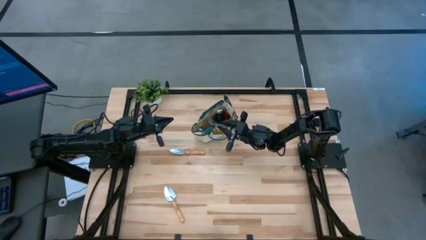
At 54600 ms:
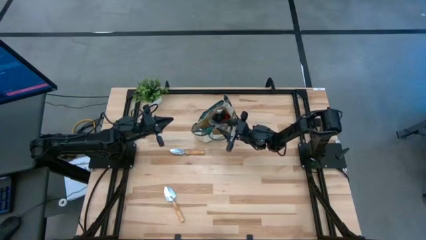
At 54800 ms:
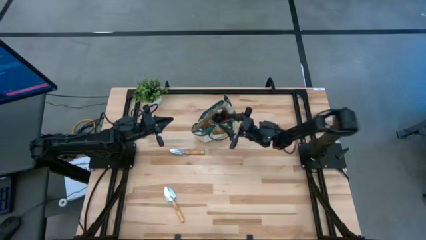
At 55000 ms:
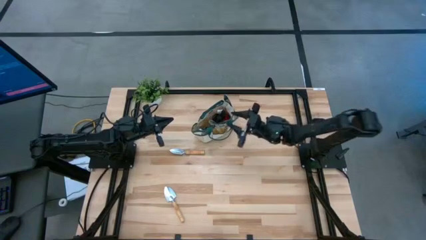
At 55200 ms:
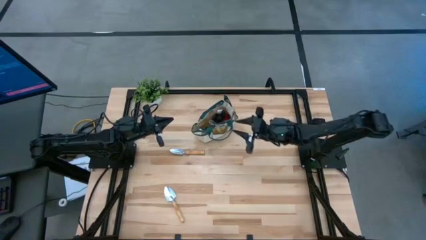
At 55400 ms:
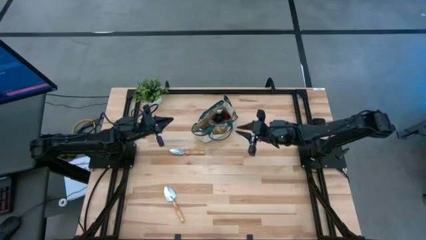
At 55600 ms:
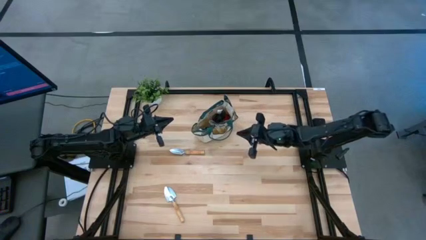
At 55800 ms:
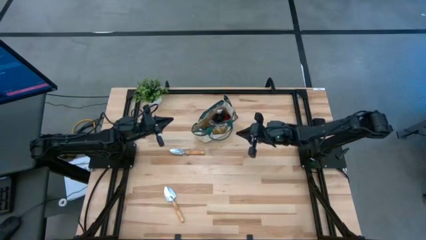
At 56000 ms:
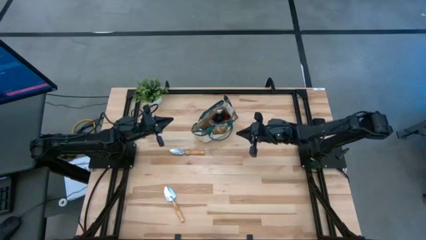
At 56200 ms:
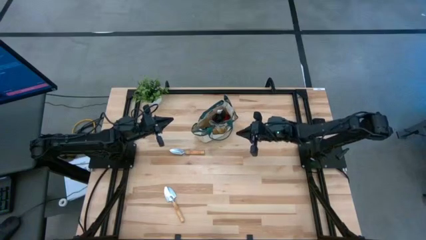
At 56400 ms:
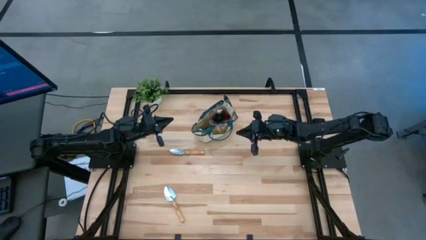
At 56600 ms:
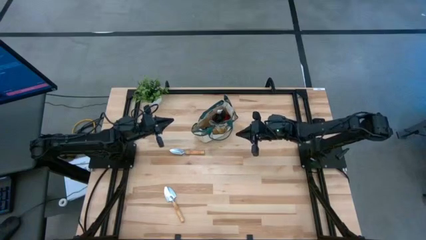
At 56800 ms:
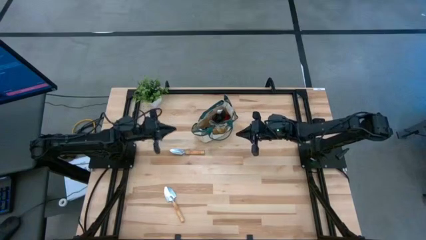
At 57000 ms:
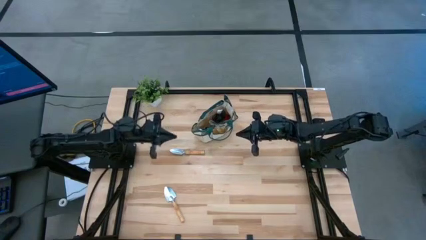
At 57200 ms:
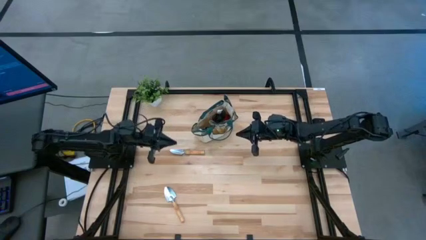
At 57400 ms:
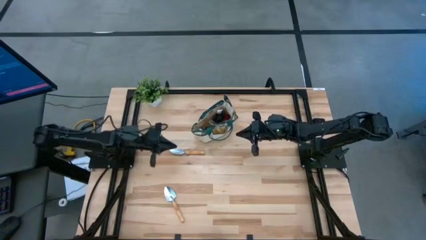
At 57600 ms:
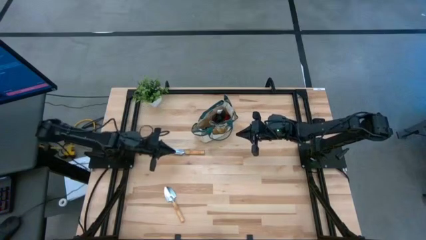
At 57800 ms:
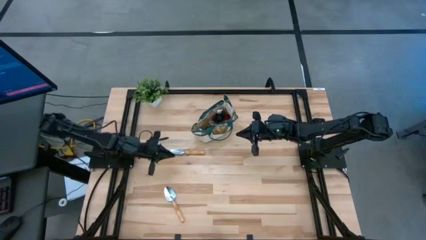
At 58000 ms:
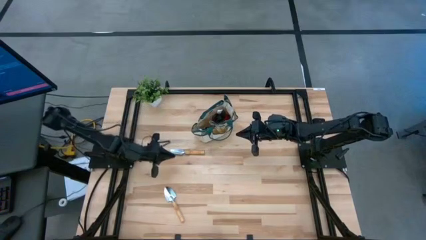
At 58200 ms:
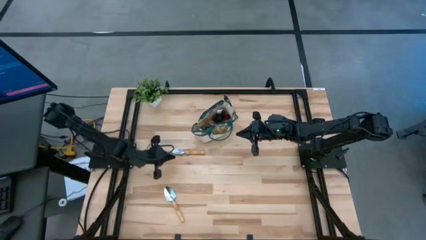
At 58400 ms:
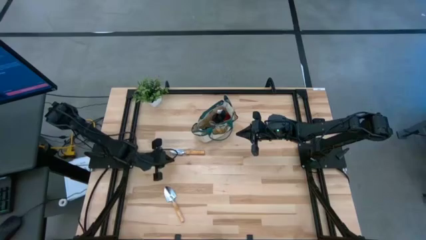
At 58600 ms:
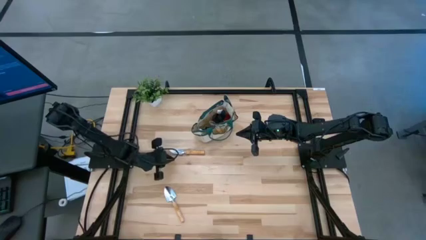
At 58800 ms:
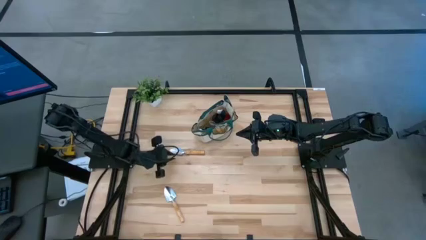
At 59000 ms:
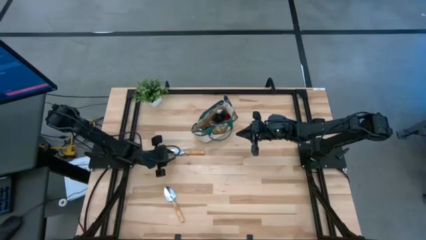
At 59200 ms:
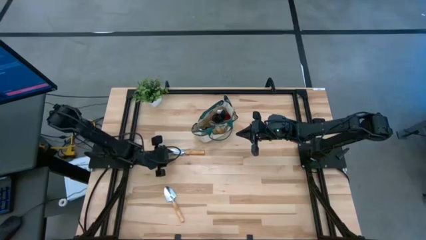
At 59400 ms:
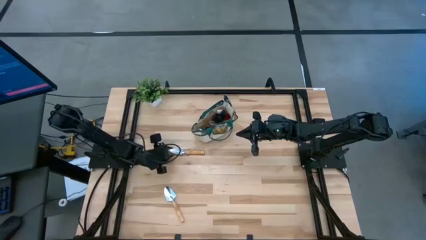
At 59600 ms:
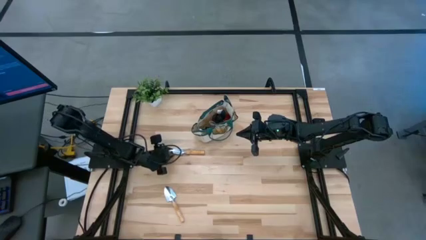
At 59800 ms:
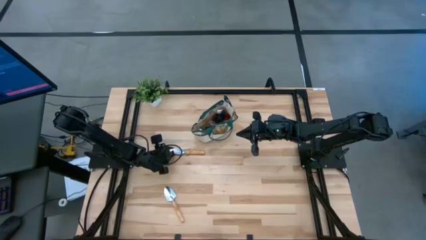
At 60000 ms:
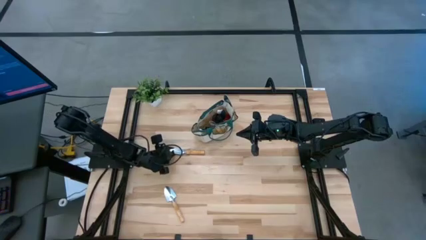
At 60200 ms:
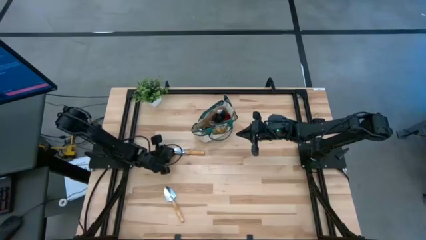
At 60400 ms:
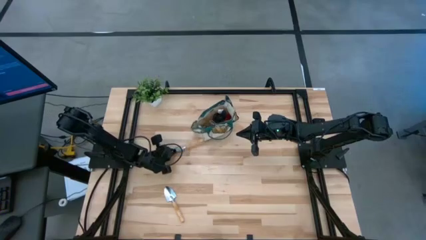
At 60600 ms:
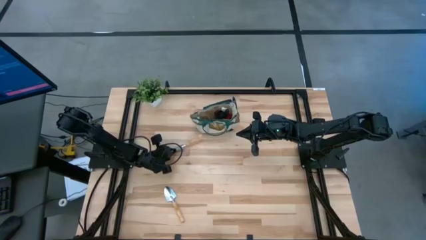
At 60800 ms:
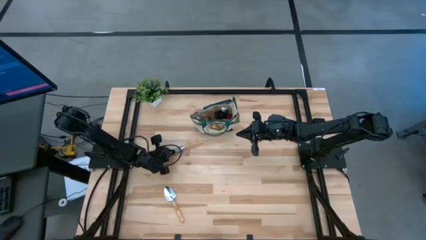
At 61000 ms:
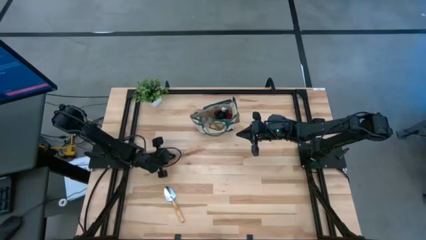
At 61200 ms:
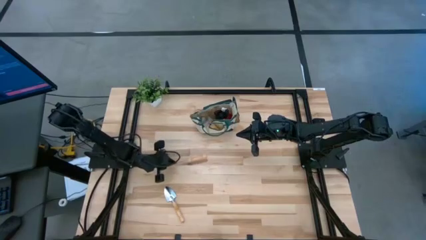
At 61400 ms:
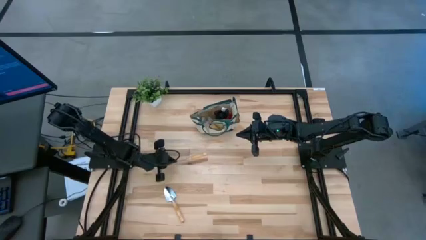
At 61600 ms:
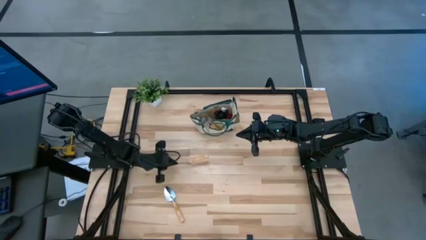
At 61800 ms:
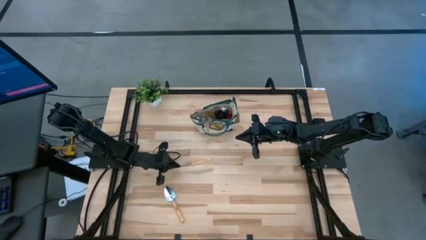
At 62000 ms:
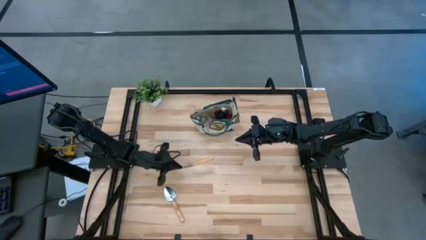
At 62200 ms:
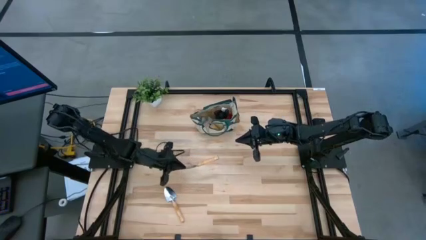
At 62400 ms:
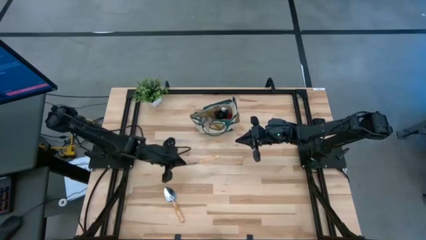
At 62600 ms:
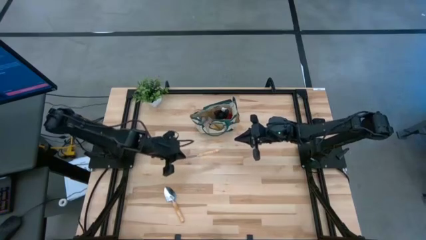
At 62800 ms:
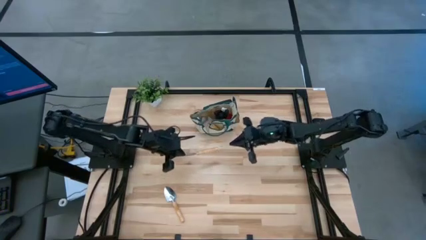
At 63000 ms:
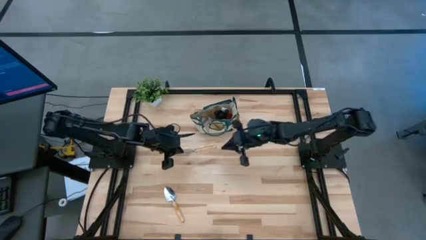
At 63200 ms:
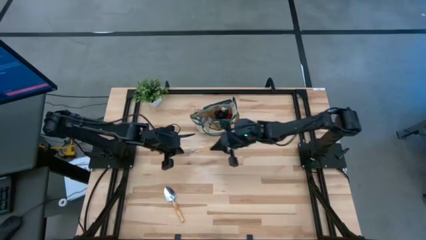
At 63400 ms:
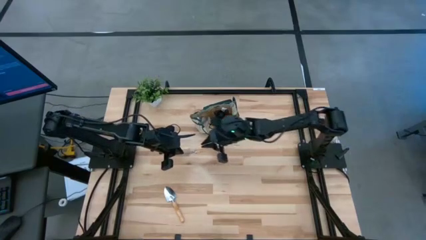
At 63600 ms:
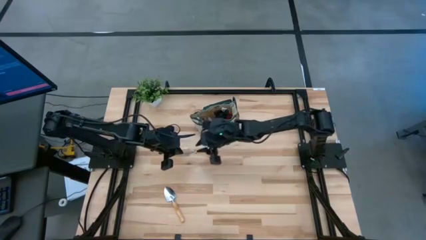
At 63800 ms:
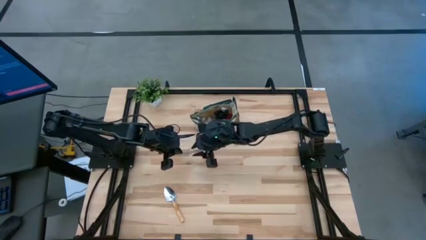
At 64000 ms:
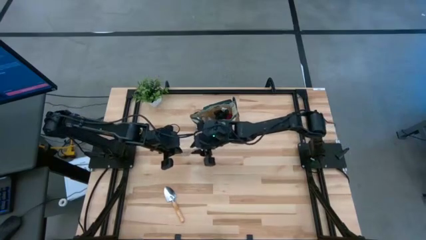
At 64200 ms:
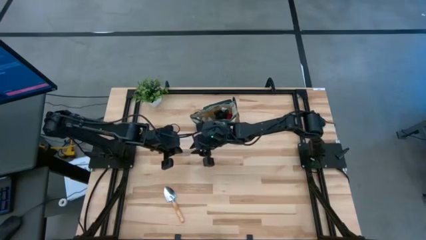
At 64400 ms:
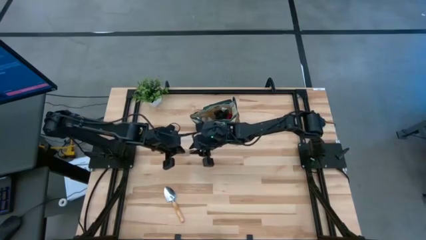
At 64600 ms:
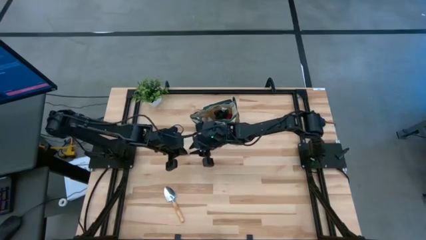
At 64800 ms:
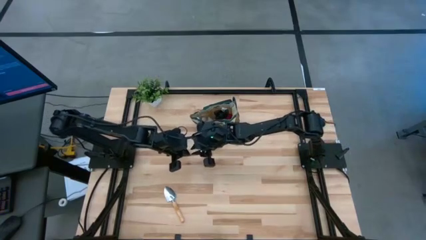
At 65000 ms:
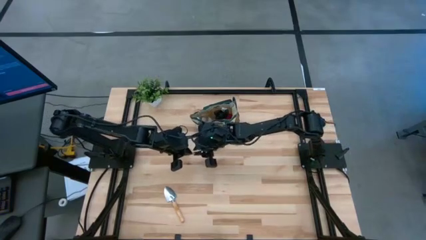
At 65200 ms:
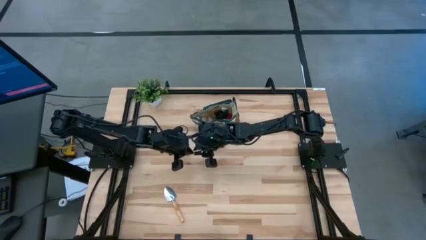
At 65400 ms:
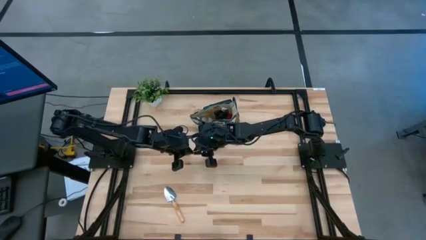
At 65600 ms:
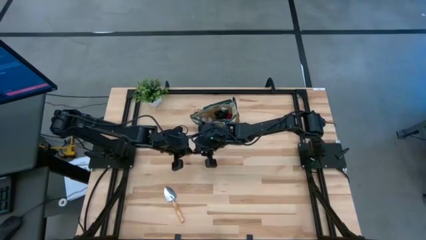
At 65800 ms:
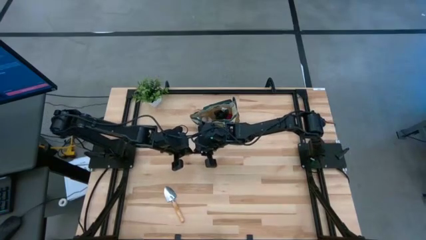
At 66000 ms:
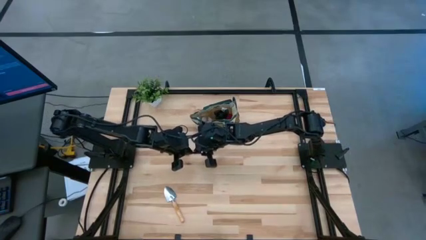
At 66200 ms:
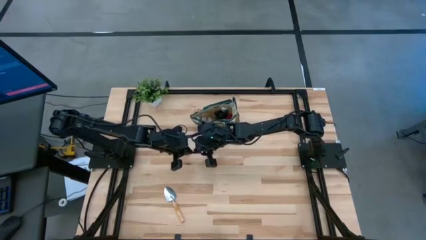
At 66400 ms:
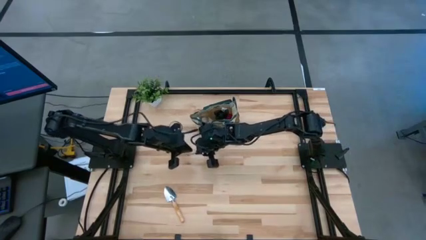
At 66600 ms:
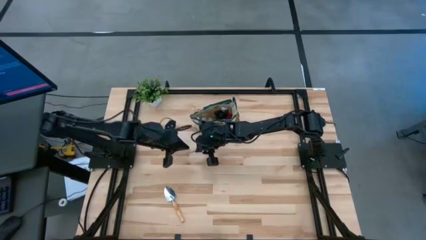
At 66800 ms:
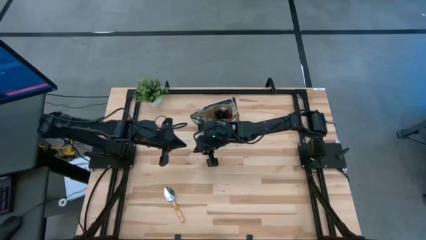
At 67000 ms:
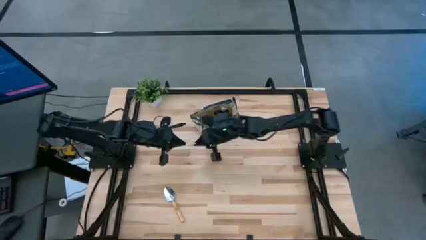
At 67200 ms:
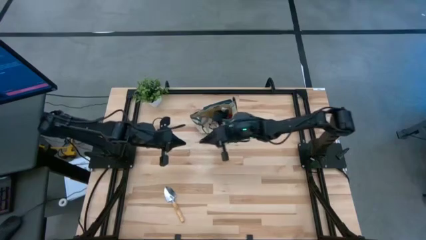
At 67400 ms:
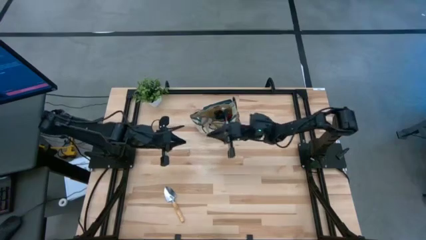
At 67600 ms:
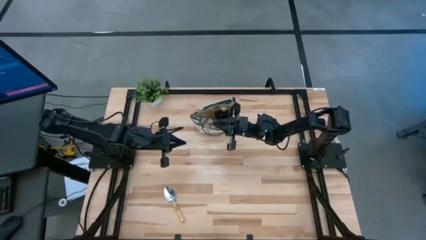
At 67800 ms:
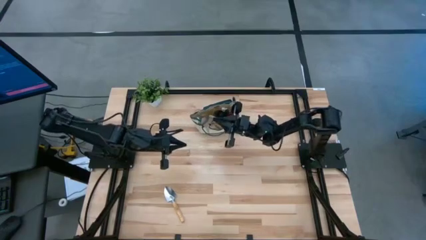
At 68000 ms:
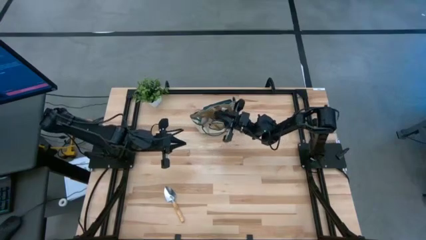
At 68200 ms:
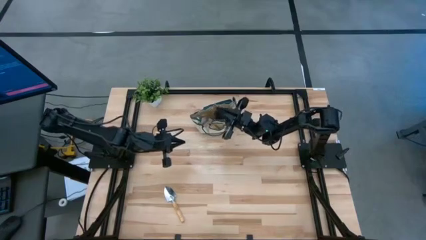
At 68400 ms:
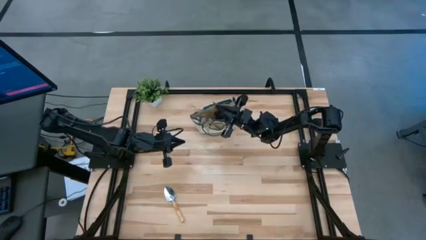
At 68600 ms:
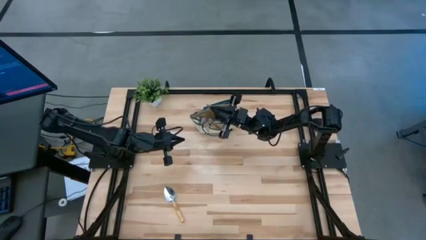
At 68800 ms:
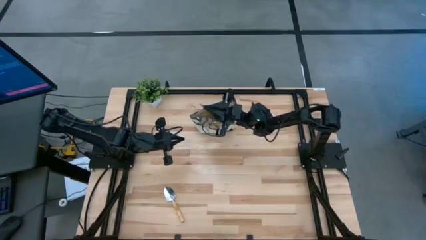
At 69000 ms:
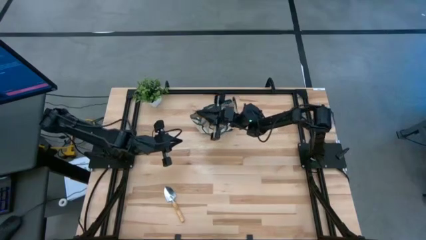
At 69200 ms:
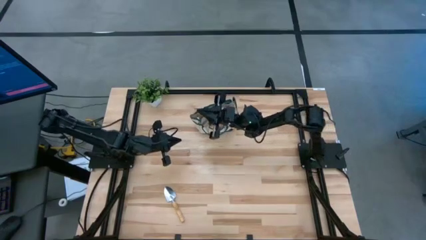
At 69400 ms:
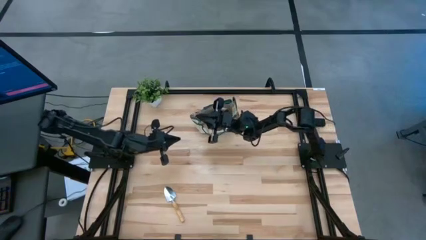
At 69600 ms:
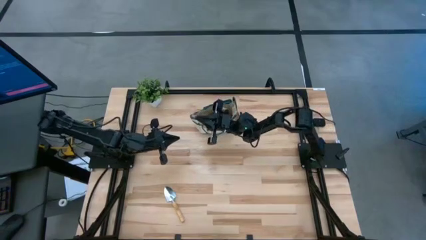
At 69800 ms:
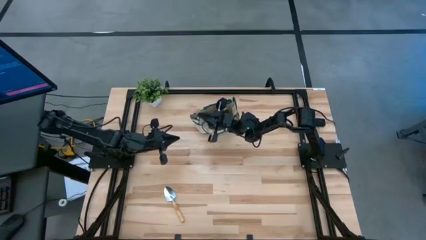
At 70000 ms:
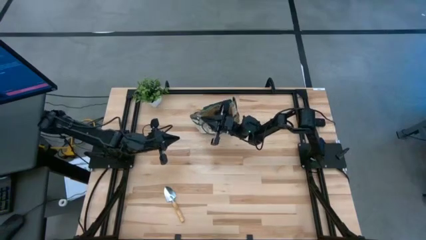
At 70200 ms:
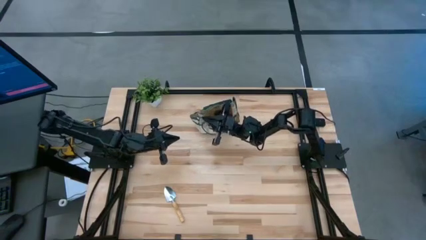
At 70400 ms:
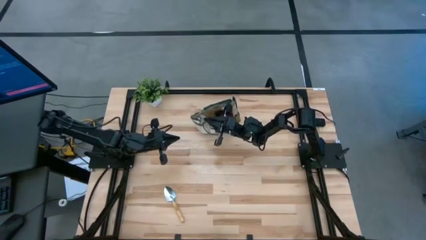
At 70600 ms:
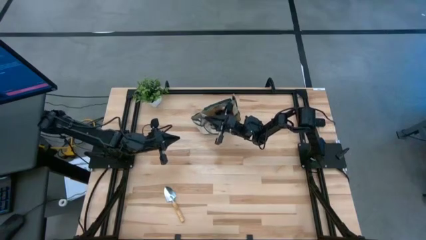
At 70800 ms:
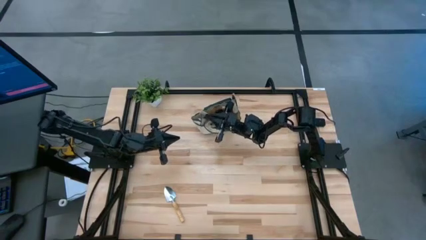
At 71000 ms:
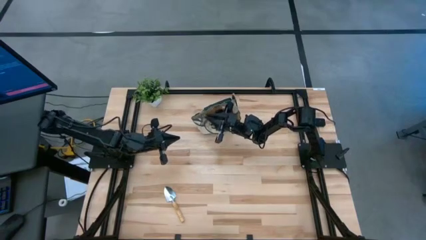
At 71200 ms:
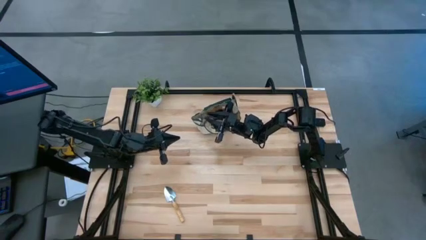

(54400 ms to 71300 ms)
Task: Pick & Place Garden tools in Gardening bag
Put the trowel into the gardening bag
